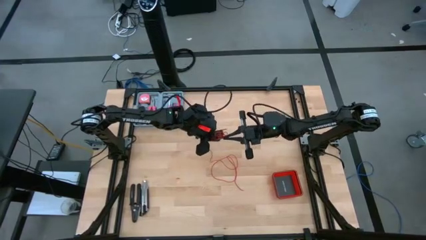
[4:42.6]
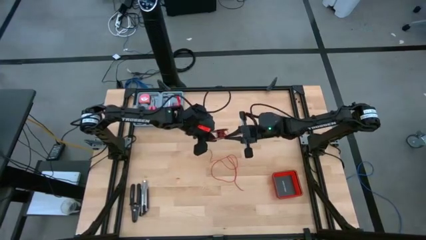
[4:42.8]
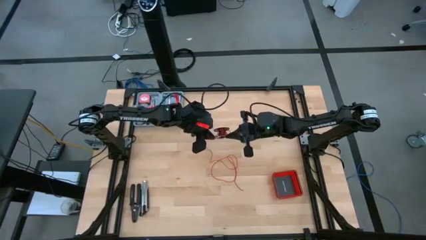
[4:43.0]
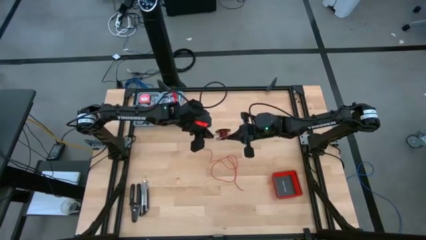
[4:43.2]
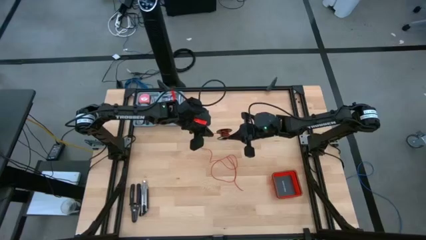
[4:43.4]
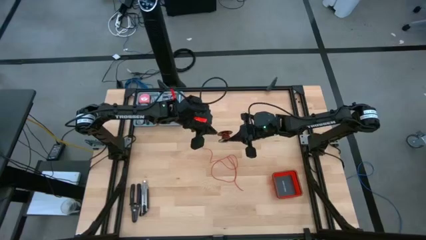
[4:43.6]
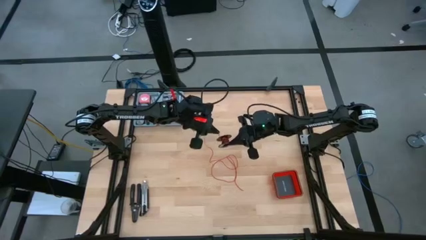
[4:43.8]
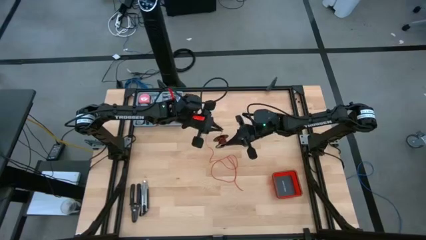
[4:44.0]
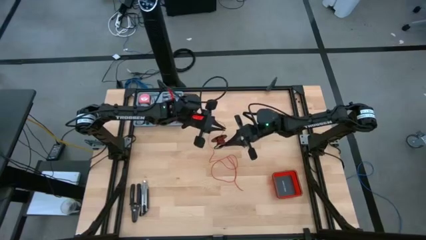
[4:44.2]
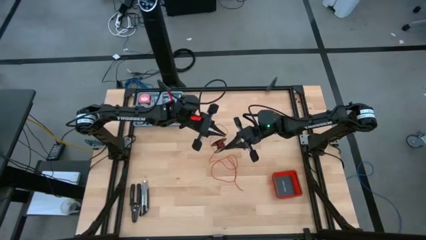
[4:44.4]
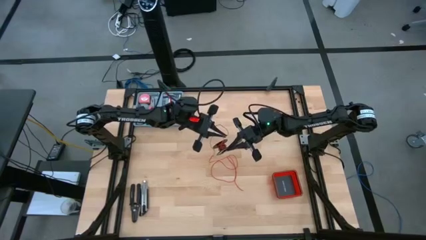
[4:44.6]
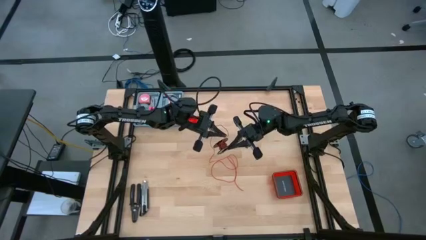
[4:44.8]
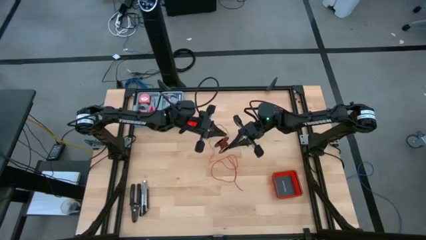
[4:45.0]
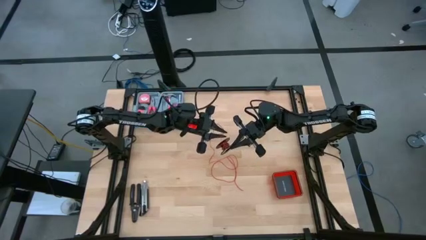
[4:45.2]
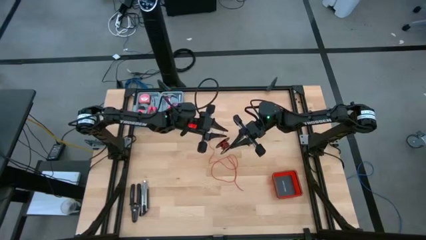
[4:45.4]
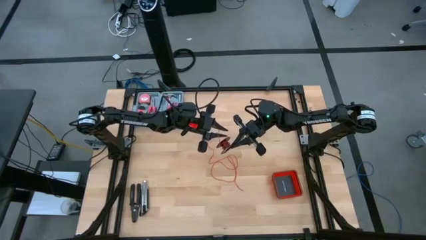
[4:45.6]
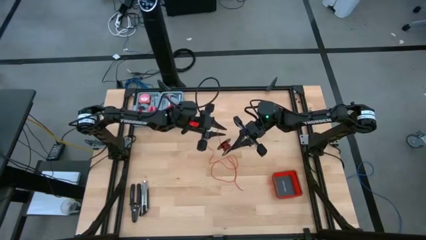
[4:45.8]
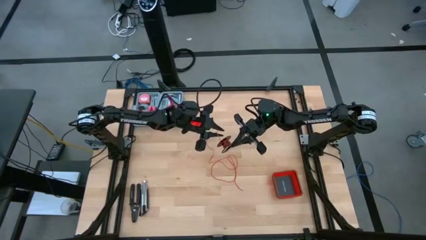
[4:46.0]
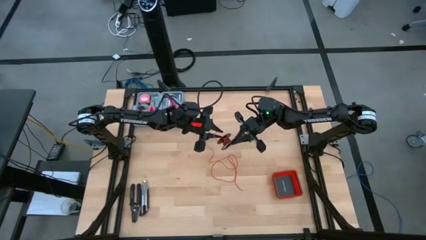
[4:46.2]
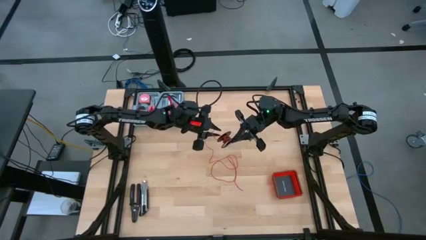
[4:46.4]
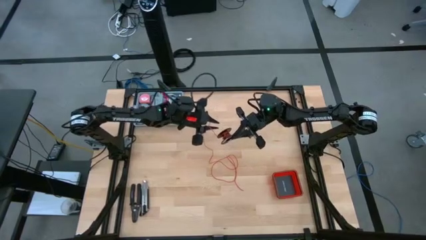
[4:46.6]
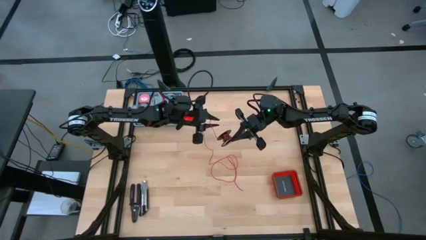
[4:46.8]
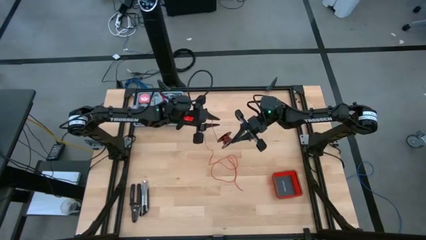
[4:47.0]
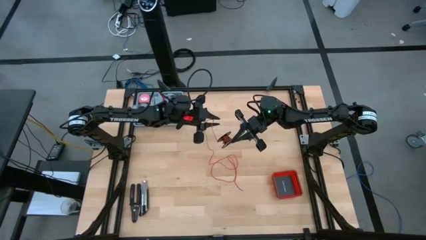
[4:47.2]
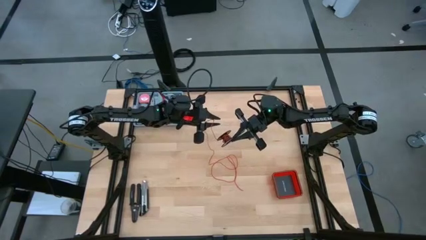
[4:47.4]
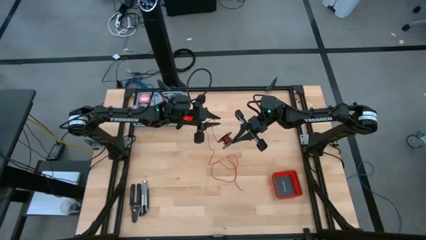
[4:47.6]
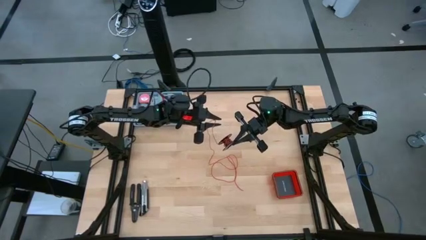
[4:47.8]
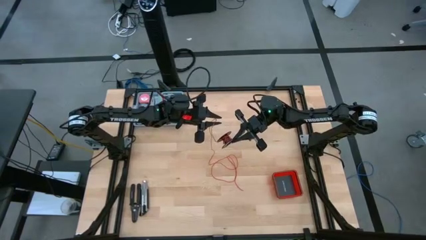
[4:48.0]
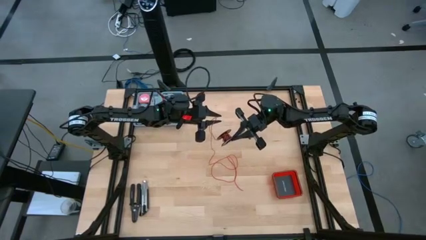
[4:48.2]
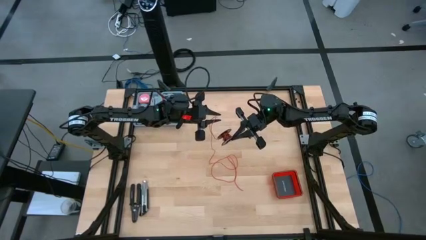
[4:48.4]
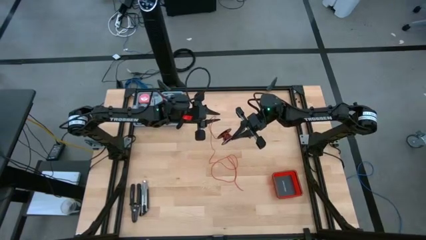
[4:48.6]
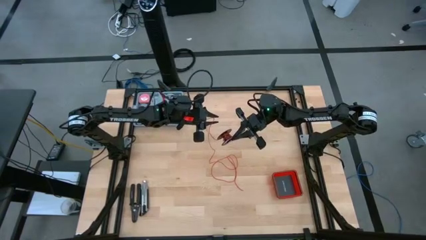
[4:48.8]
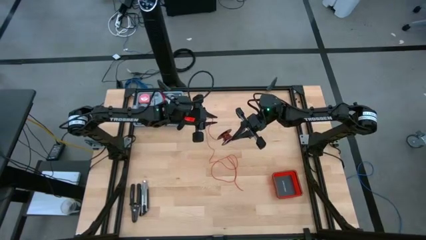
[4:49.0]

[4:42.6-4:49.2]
Task: Coil cords
Coil the red wire onto the spool

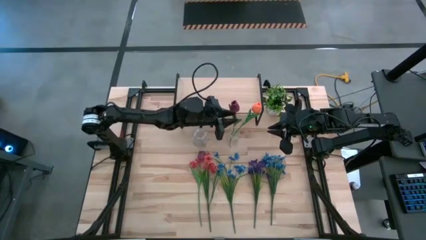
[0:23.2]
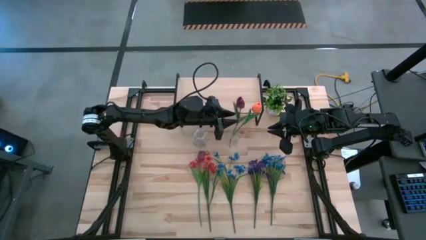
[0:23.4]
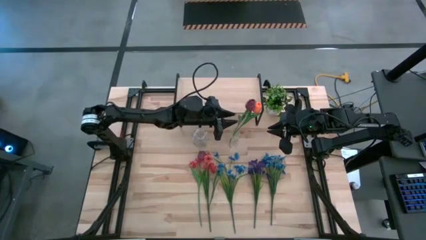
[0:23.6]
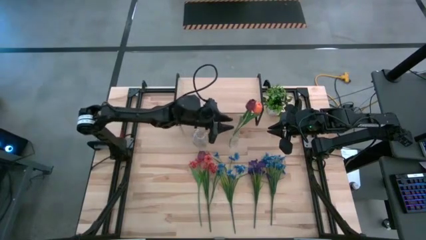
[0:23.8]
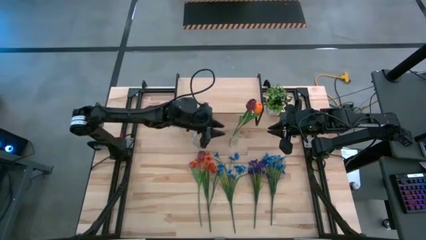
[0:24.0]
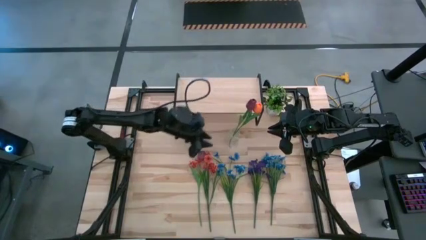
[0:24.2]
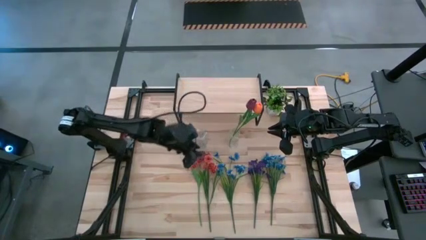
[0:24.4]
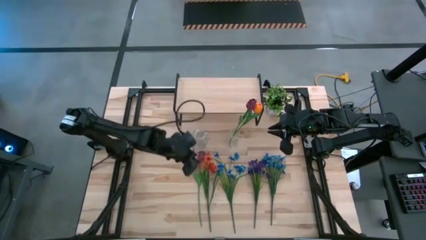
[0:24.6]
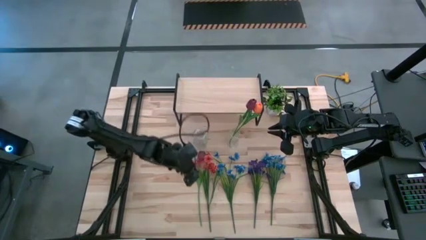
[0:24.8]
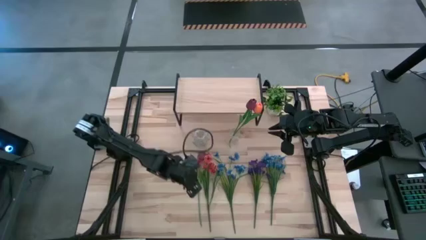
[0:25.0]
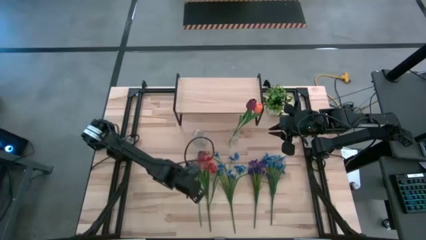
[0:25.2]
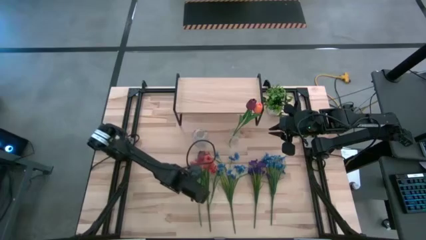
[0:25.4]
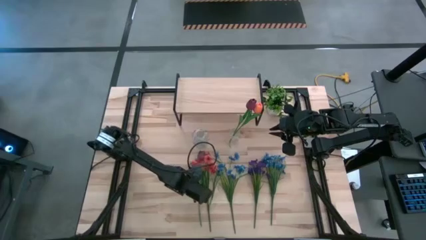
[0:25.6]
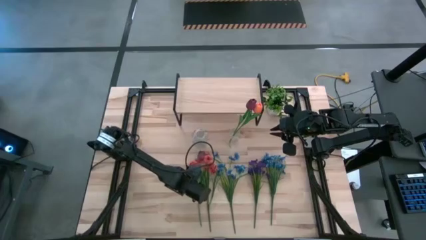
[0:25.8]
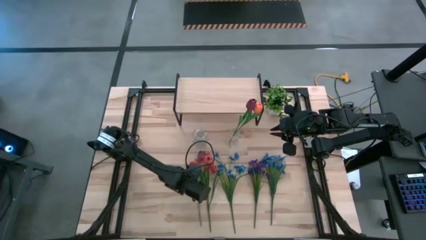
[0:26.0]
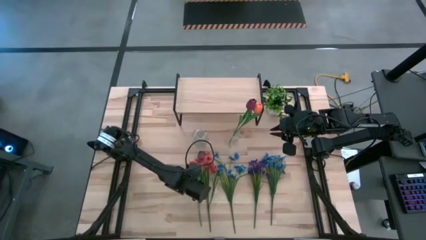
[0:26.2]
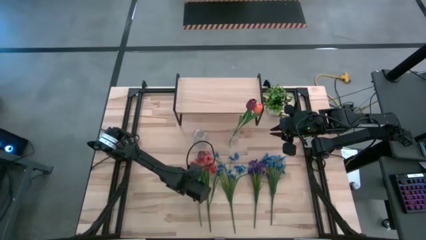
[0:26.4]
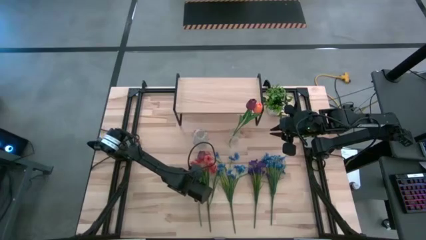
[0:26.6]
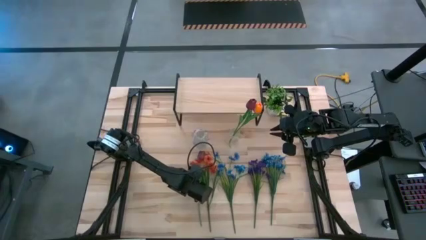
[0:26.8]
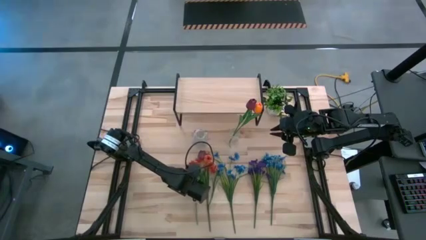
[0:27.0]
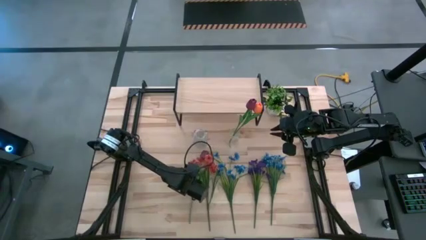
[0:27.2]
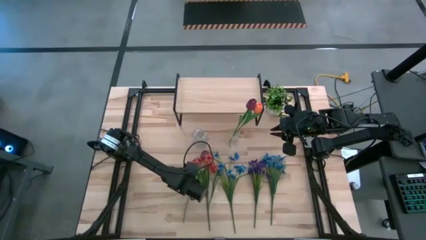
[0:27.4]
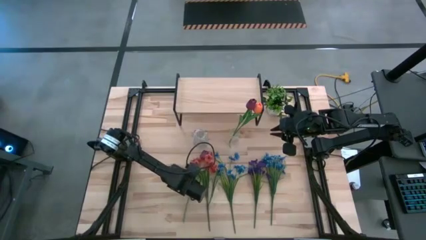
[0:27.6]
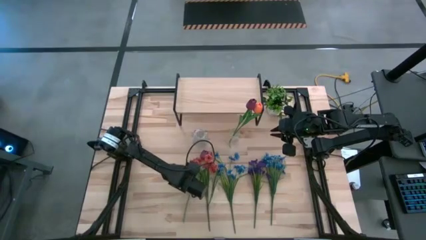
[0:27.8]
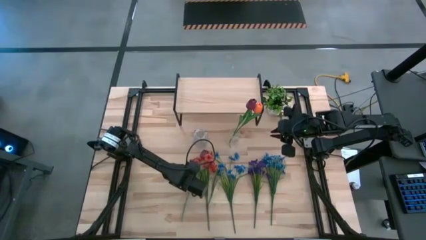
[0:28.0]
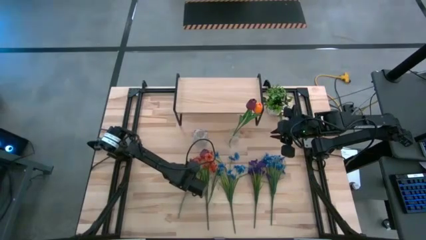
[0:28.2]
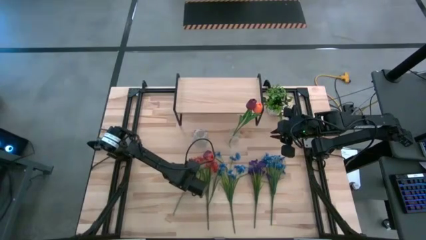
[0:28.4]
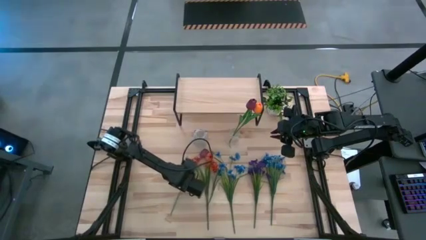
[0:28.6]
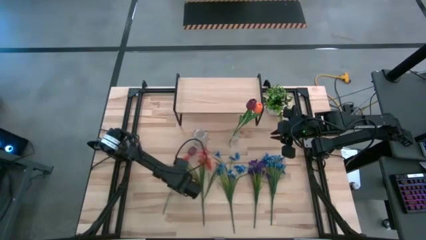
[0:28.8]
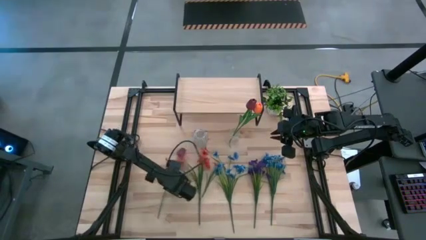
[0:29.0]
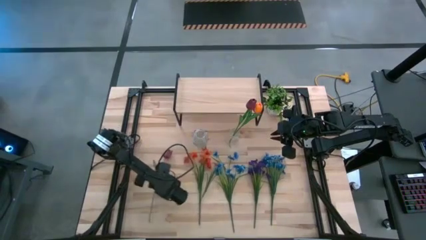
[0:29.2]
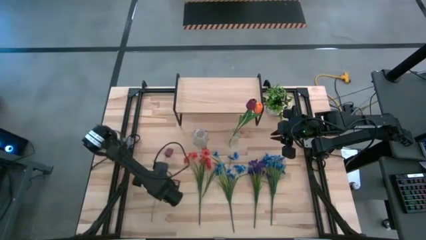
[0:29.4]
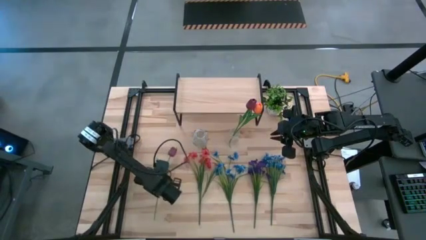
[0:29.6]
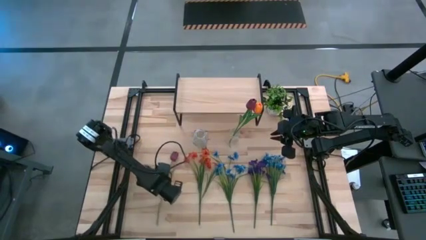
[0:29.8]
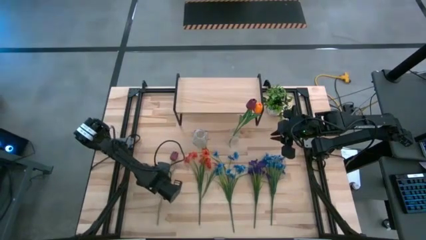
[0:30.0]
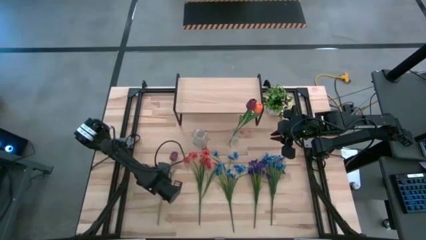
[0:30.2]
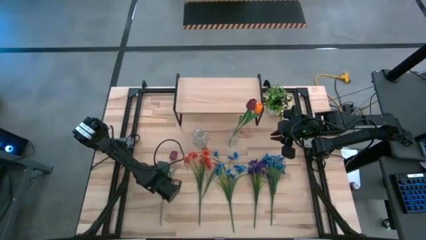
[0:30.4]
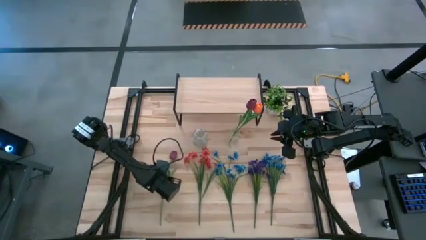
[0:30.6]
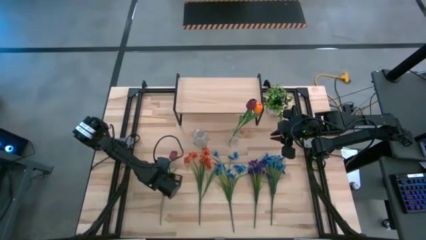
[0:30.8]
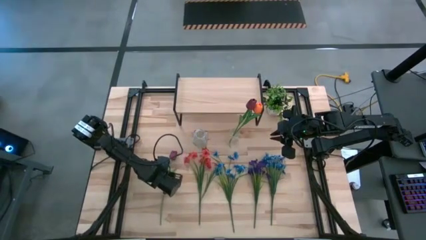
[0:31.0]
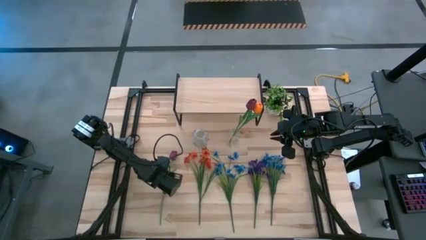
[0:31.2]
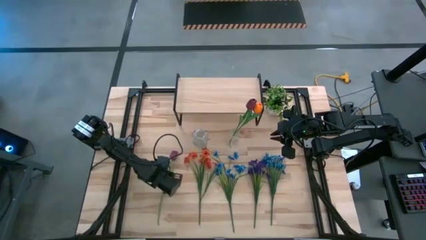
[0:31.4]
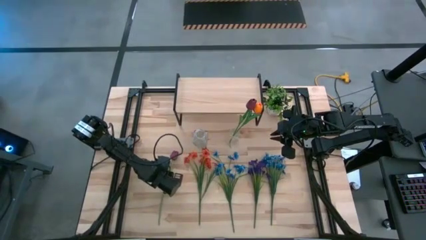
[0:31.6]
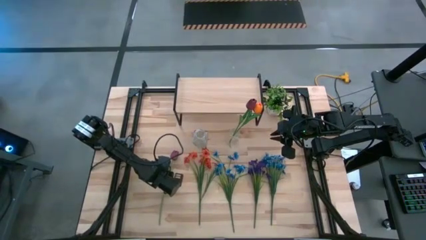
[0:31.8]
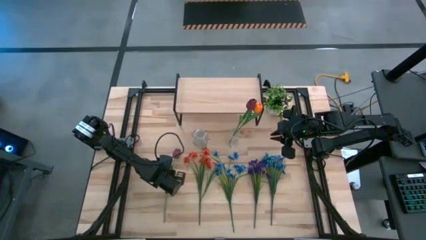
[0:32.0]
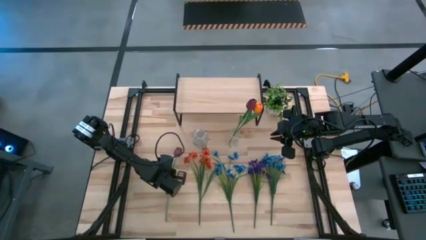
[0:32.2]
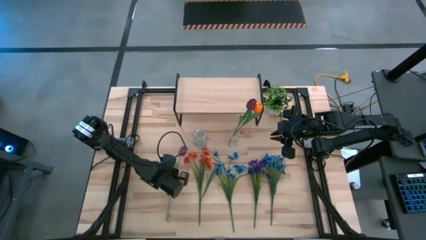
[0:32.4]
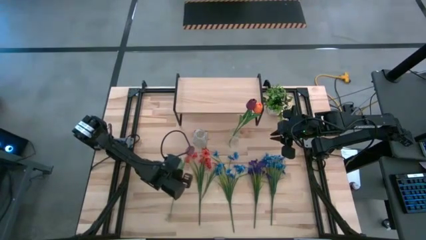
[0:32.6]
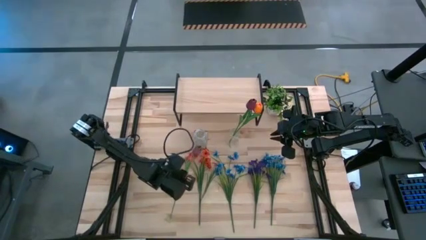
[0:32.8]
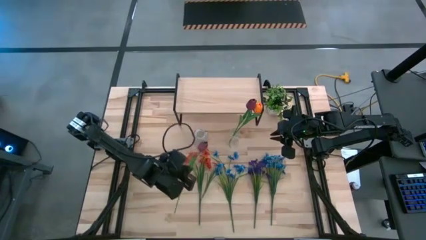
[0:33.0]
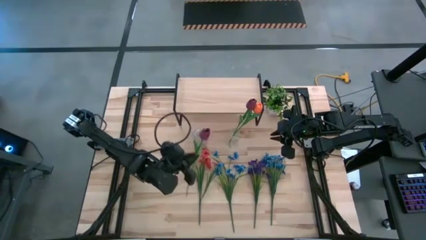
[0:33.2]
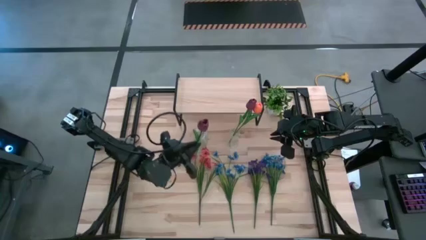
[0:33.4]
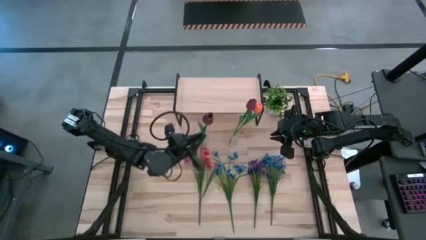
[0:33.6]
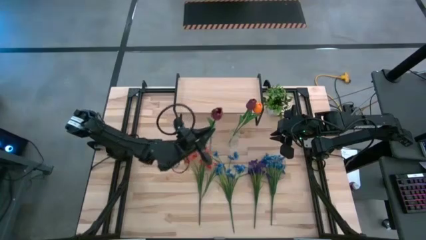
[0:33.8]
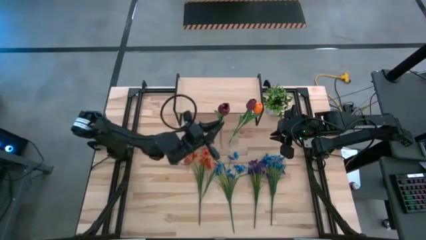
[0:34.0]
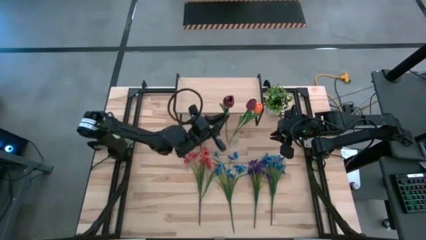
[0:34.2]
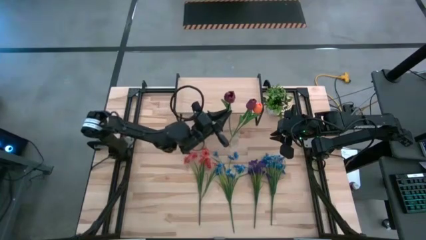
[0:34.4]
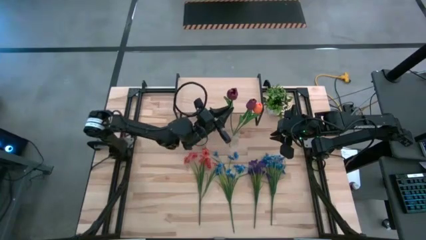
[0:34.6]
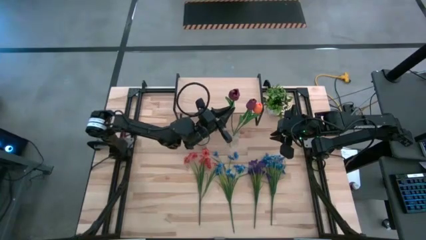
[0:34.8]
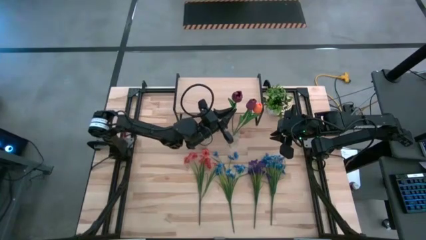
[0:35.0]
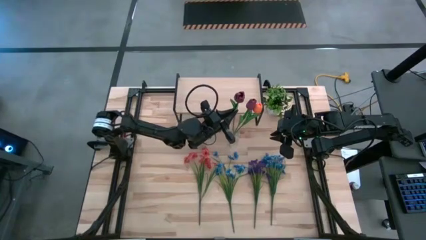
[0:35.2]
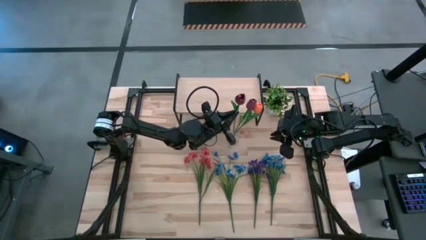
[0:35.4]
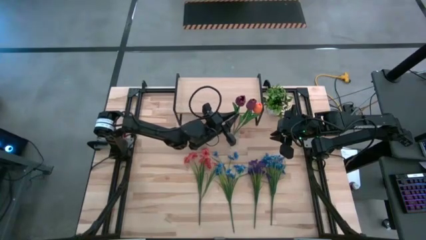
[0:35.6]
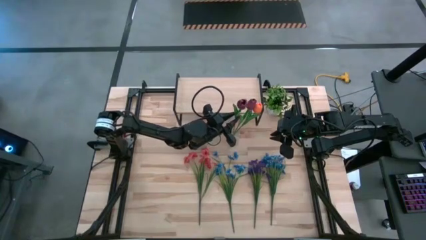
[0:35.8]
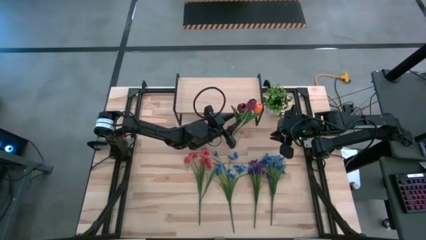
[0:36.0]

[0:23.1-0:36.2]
Task: Pick and place flowers into a vace then onto a shelf
Put the red flower into the right transparent vase
